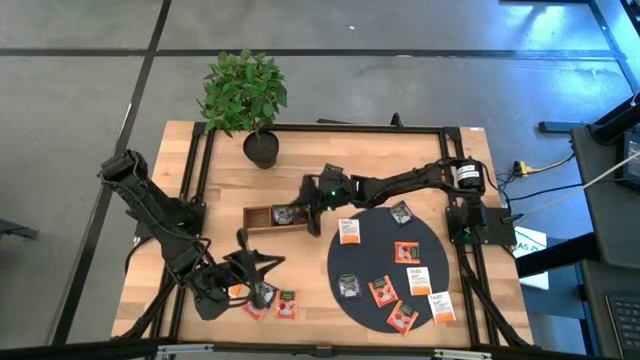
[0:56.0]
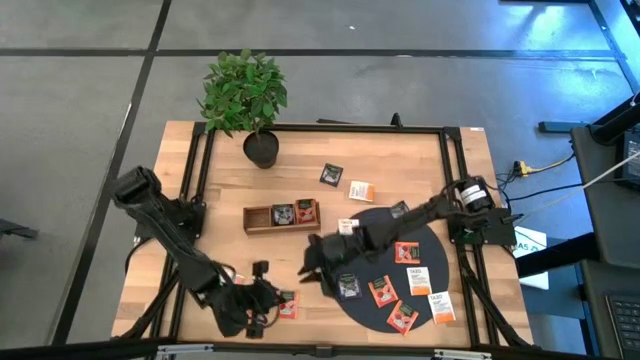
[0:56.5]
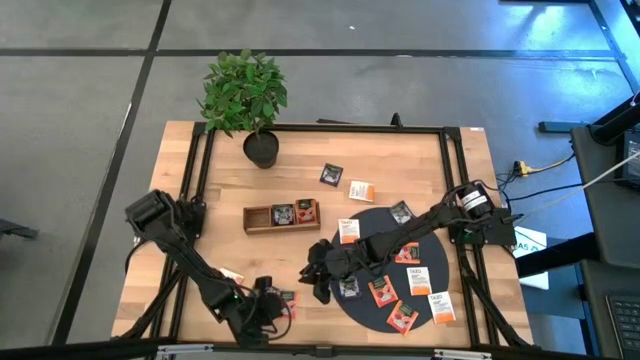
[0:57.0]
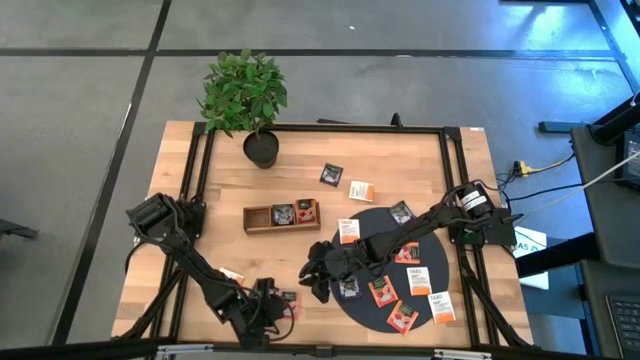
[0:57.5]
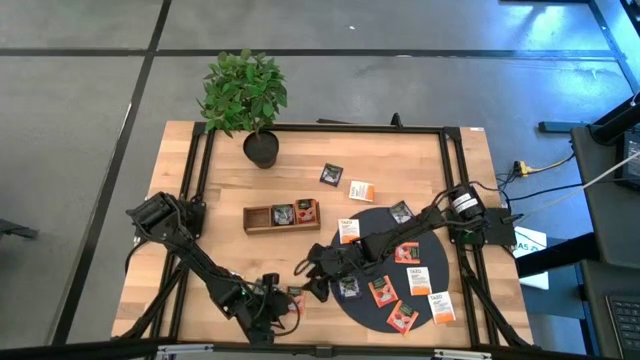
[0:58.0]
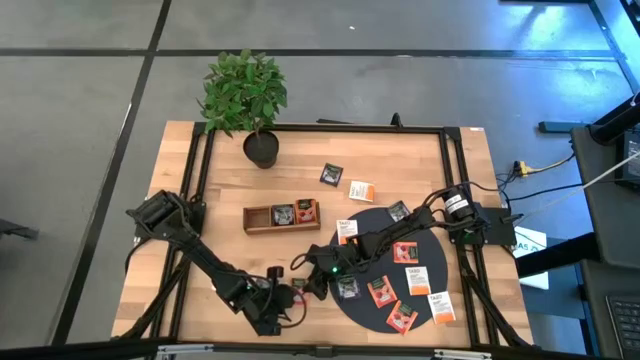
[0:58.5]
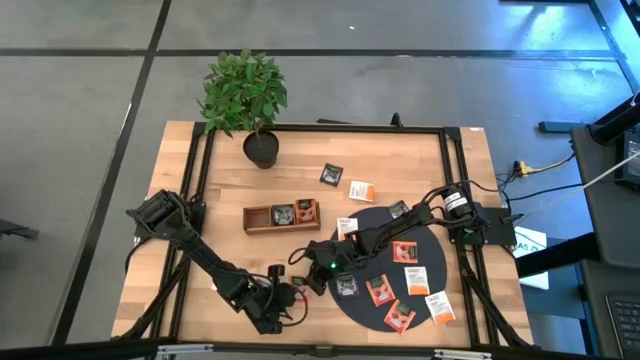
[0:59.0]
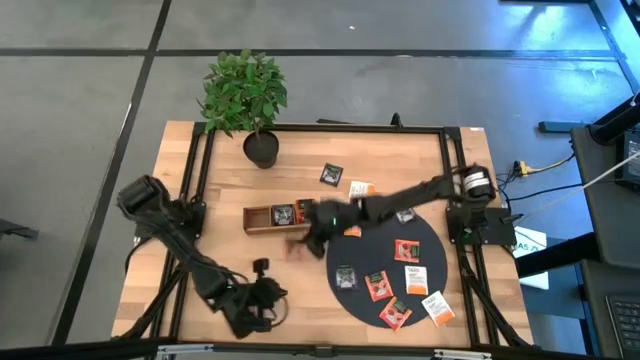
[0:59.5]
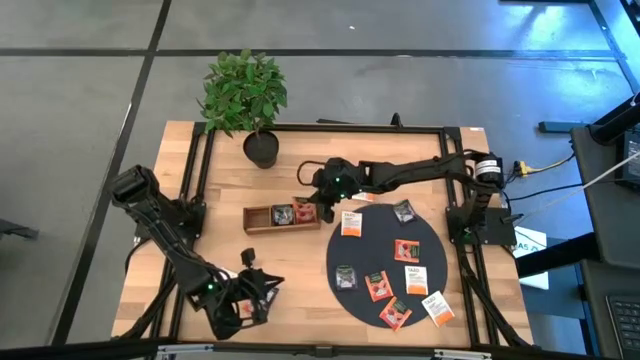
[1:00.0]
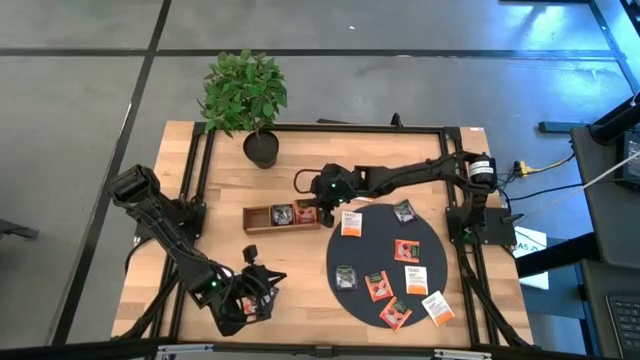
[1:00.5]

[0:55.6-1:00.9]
Task: Pick & Place Tea
Put the orange tea bag into the right section of the wooden organizer

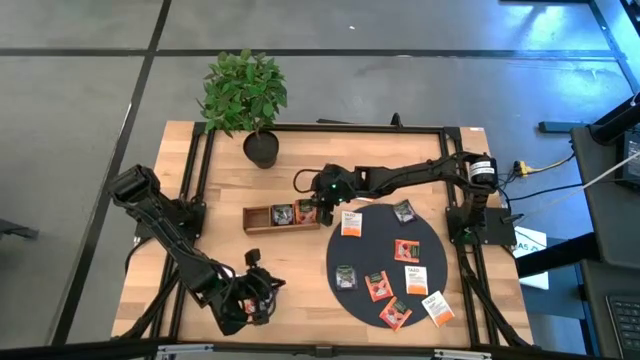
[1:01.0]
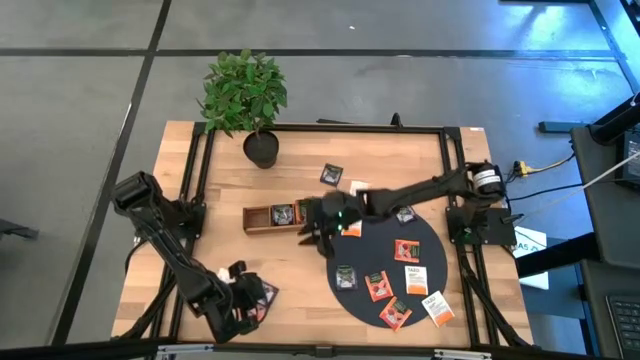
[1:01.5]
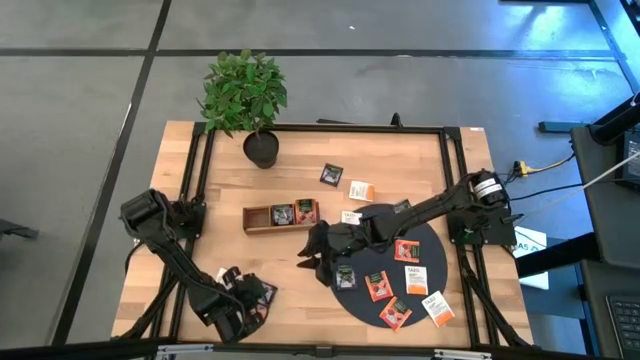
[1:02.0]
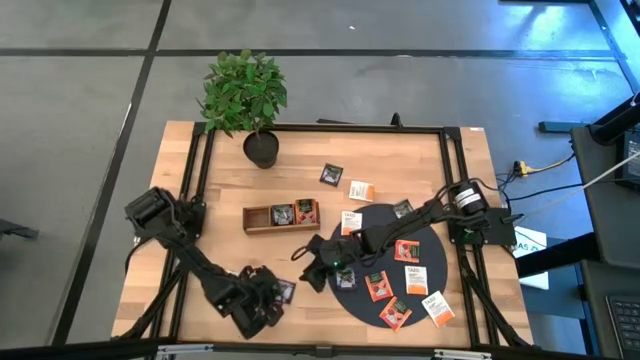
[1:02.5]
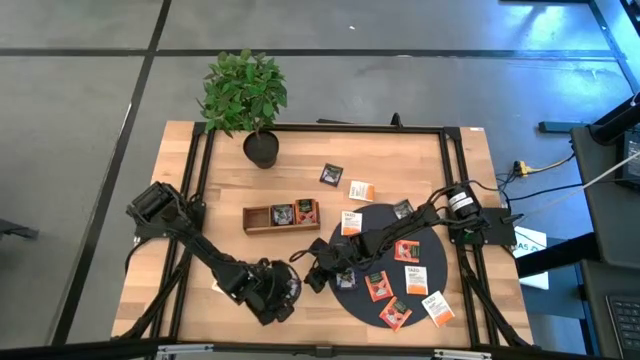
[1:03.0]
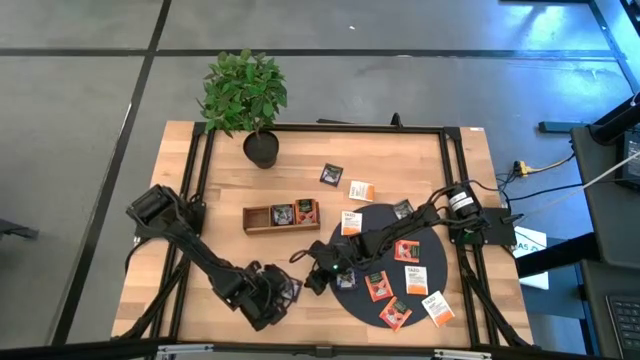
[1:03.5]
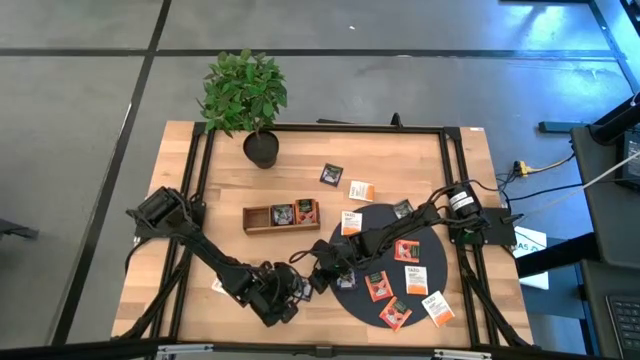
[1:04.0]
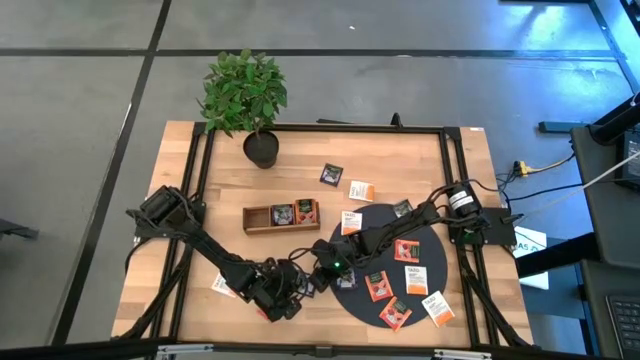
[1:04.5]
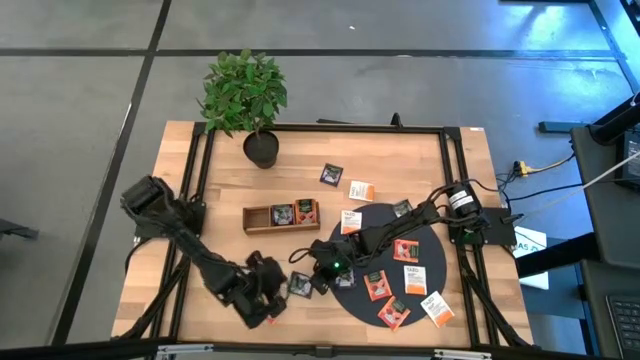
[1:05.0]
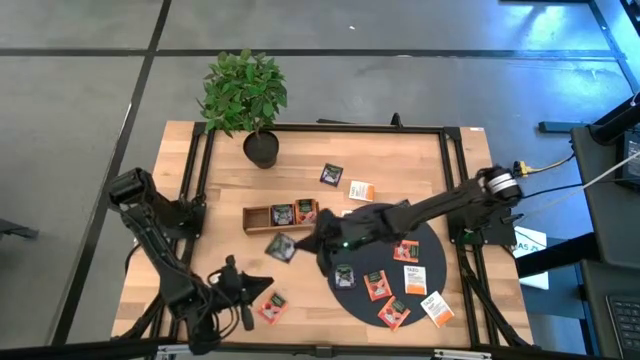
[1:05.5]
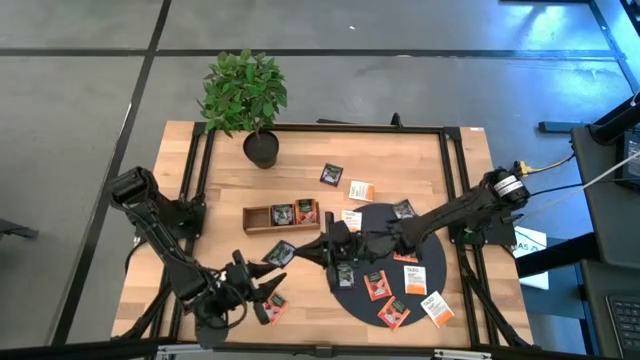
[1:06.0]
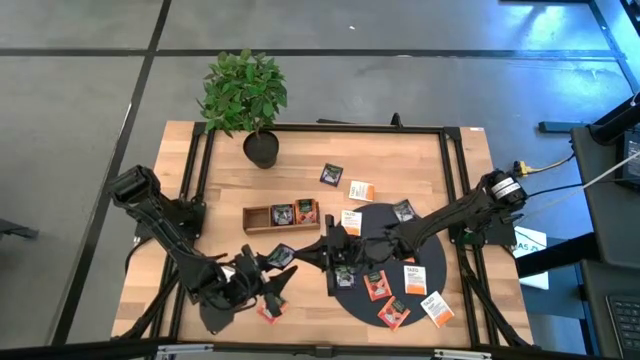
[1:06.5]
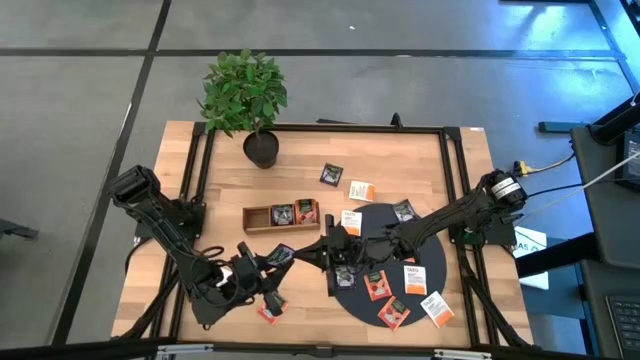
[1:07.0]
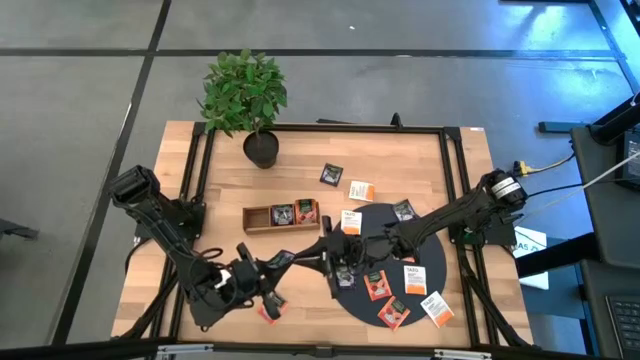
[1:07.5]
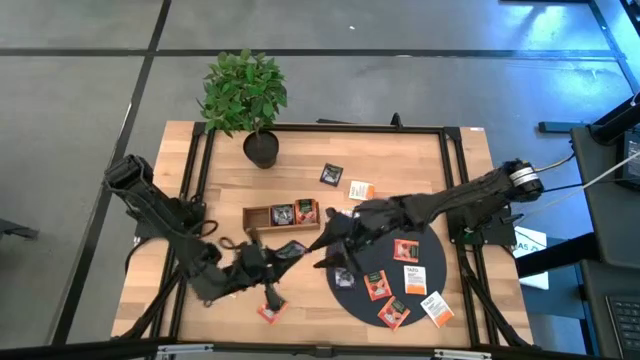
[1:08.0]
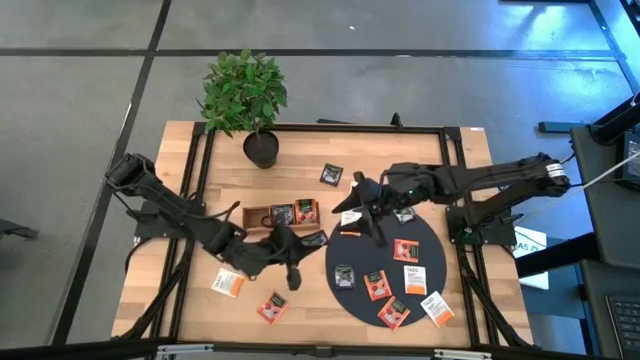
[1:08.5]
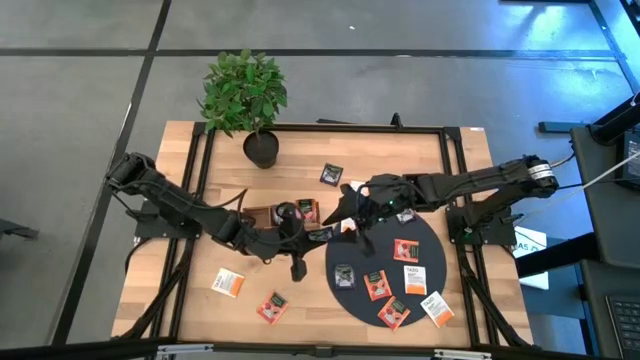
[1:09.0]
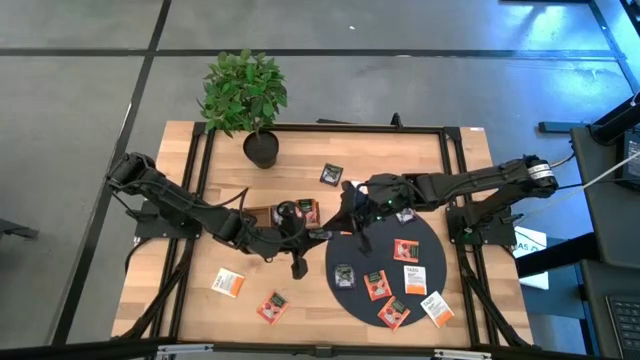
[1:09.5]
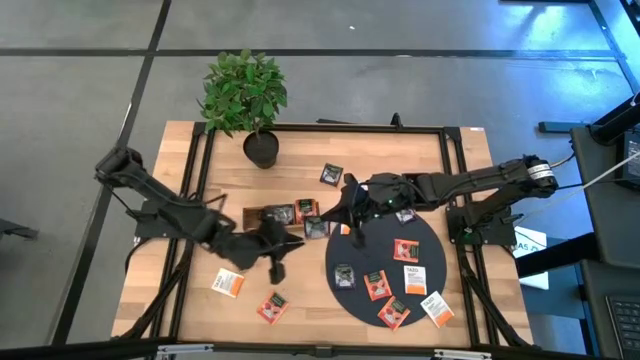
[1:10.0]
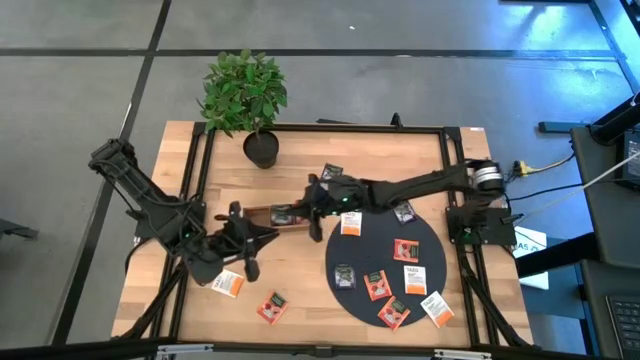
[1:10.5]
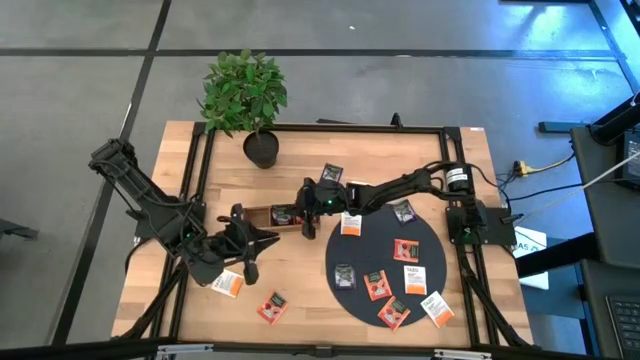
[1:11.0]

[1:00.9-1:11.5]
Put the purple tea bag into the middle section of the wooden organizer

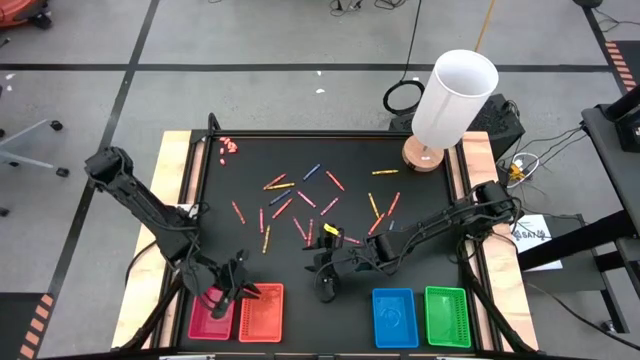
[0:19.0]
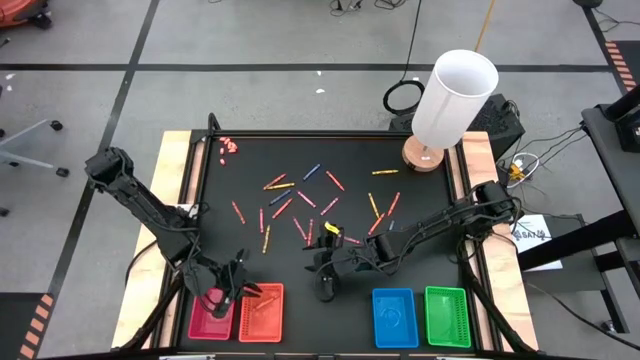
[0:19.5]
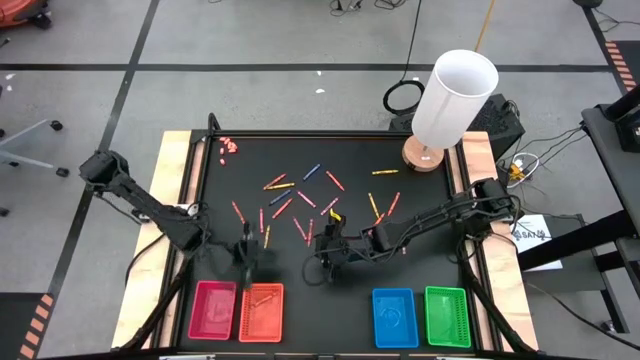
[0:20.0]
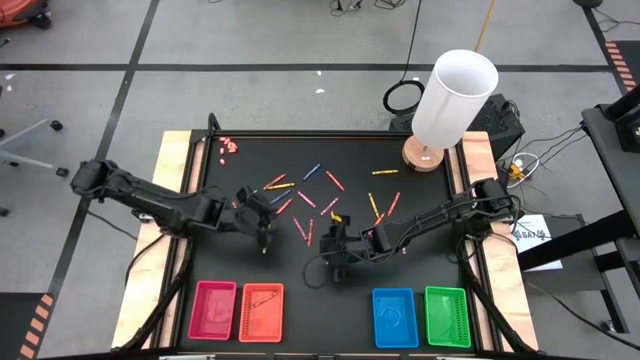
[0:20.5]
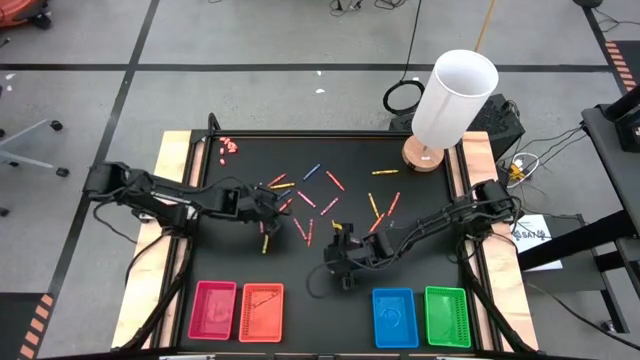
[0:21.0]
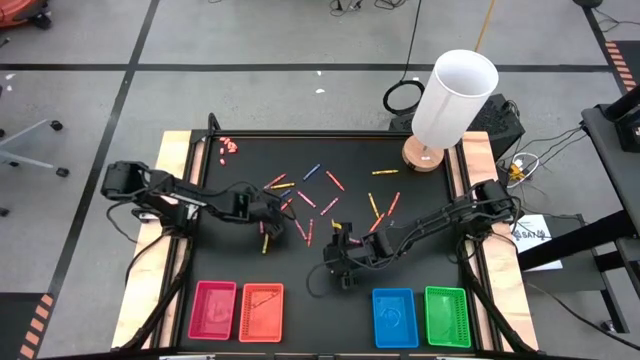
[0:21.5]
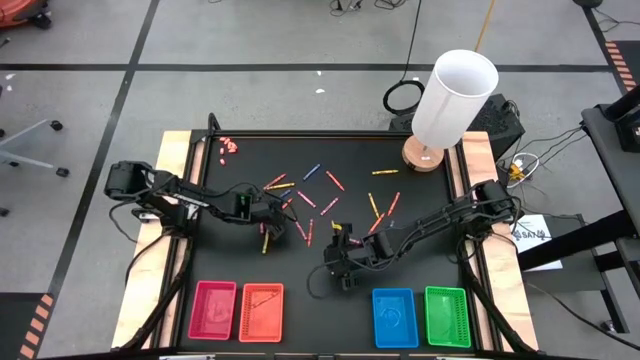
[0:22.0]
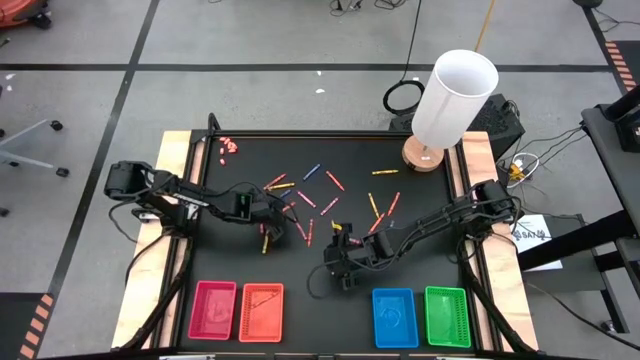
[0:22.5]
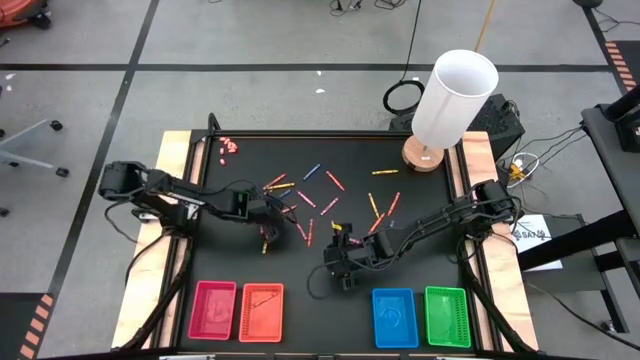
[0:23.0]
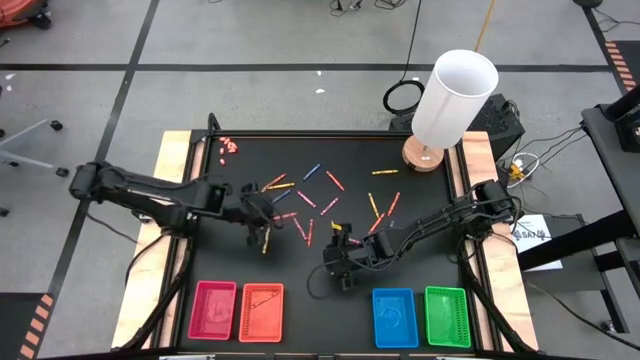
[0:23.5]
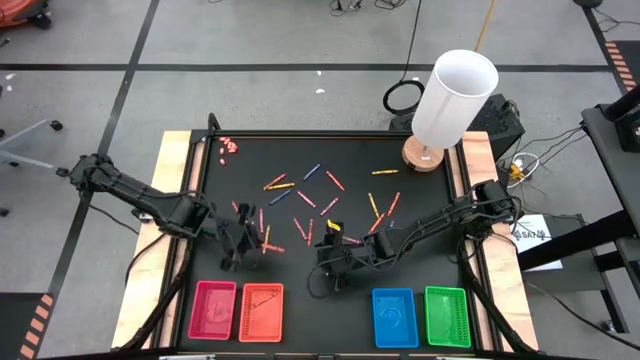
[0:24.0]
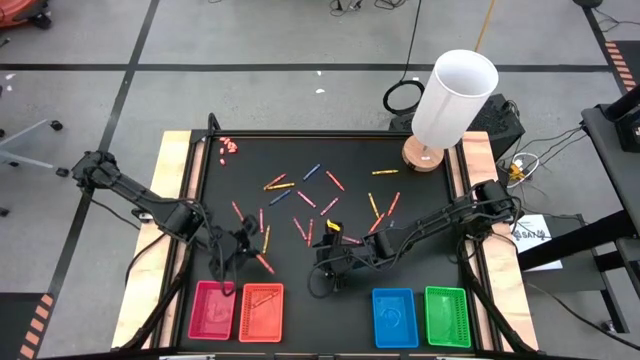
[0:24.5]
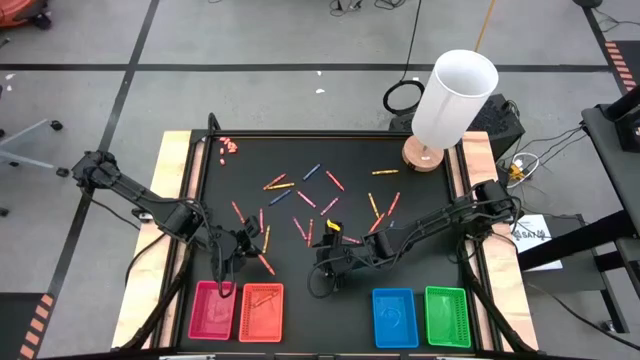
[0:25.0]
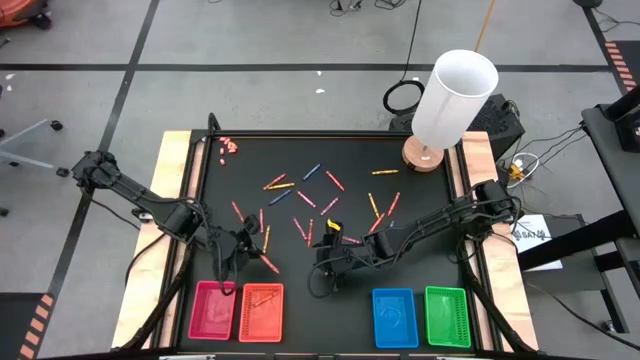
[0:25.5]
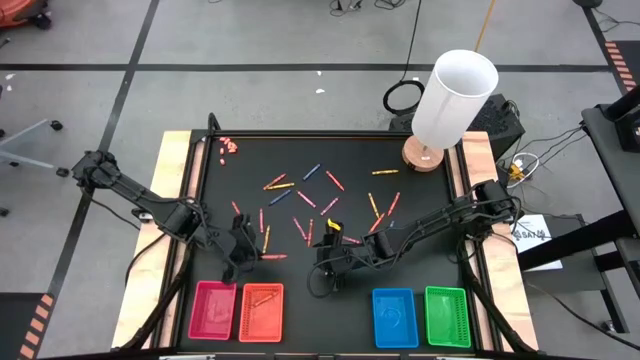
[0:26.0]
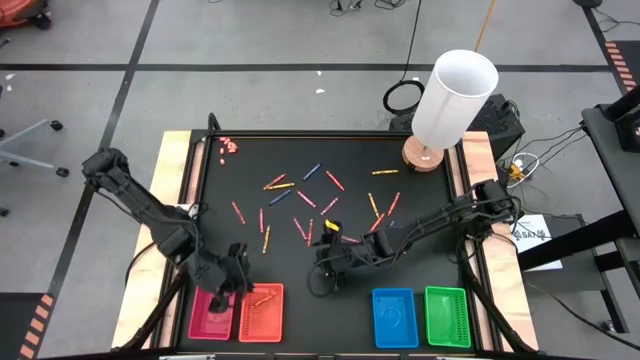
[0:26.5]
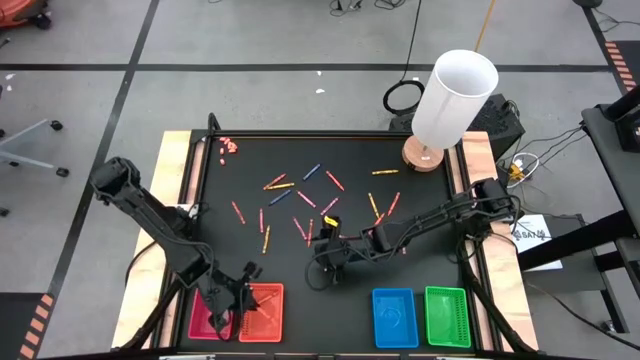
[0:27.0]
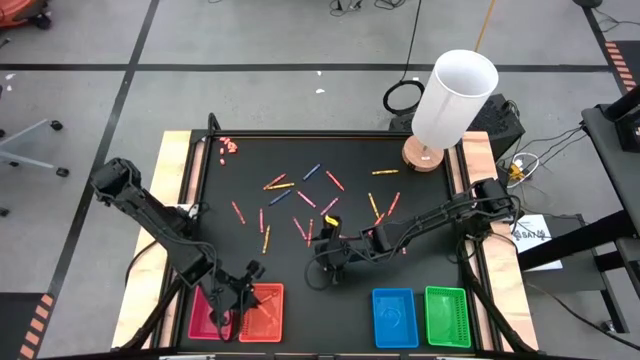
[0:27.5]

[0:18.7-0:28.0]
Task: Sort crayons
Put the orange crayon into the orange bin
